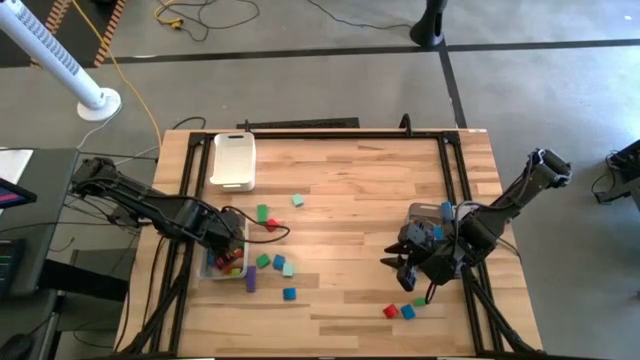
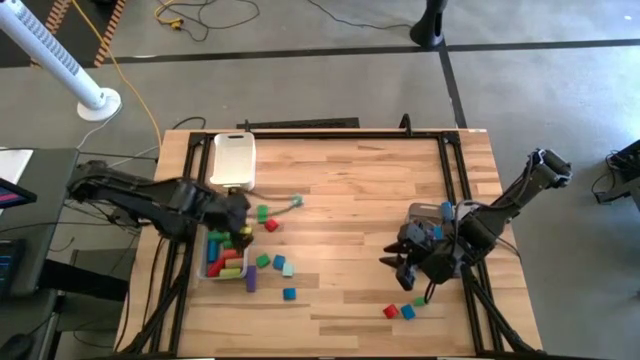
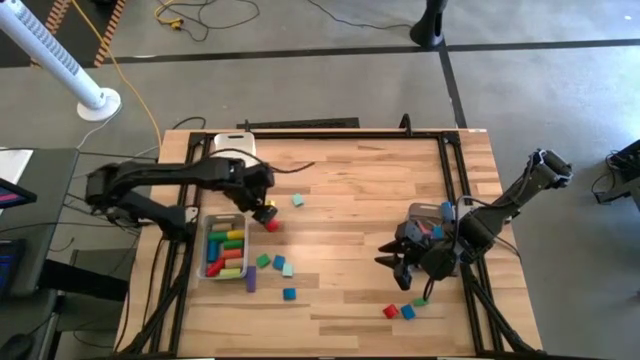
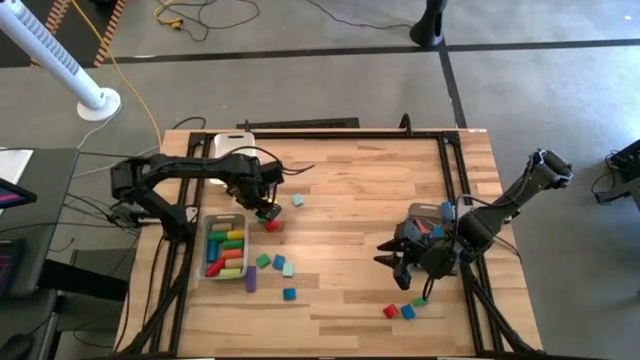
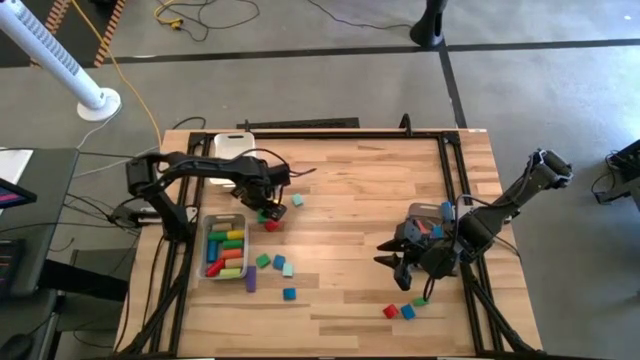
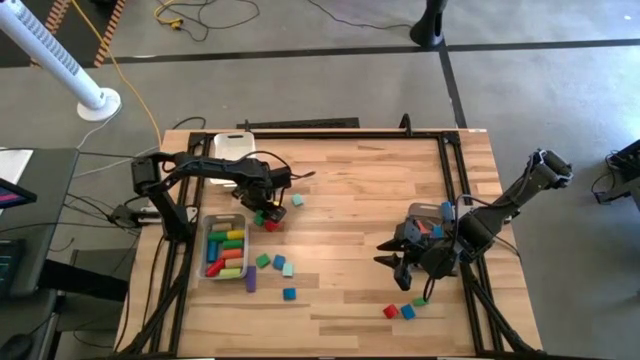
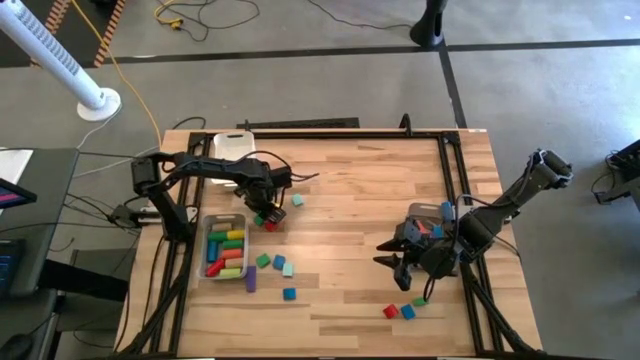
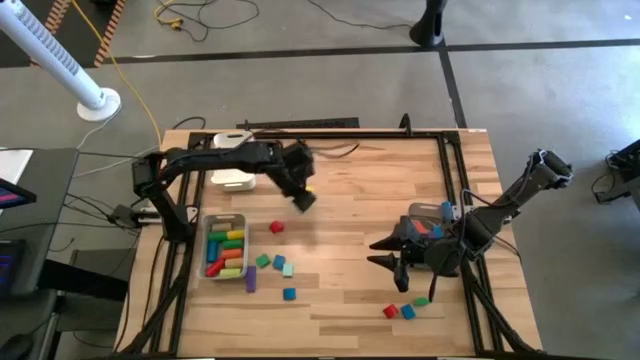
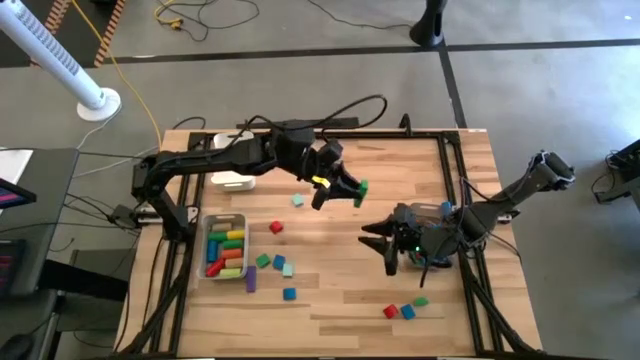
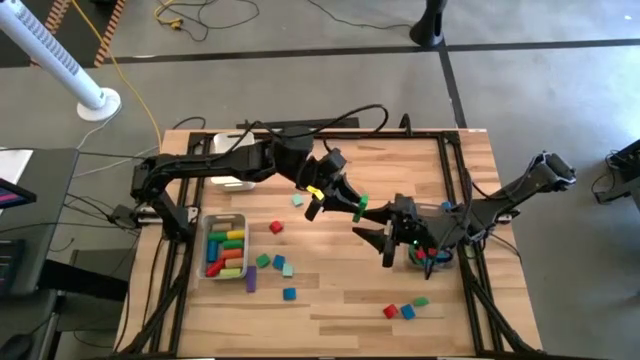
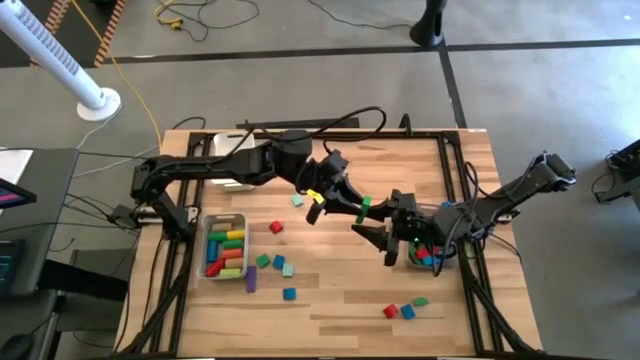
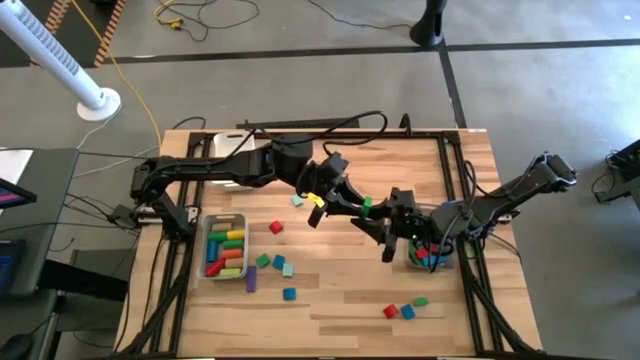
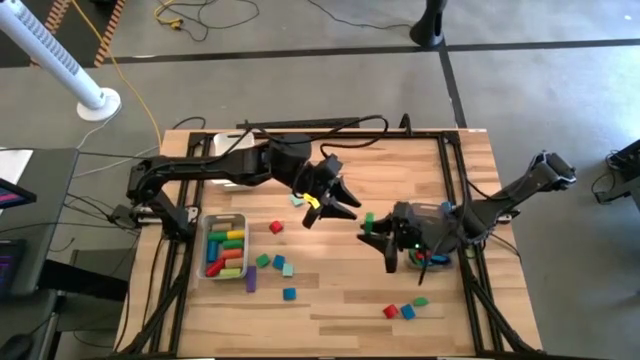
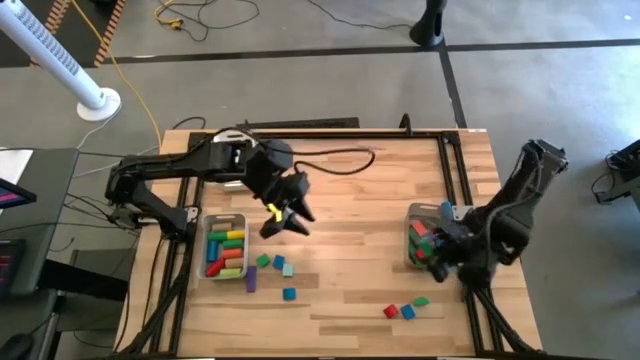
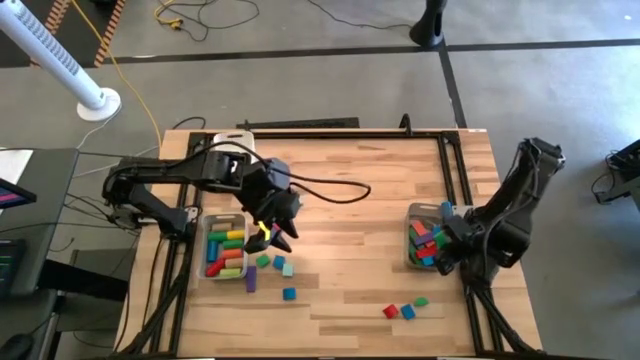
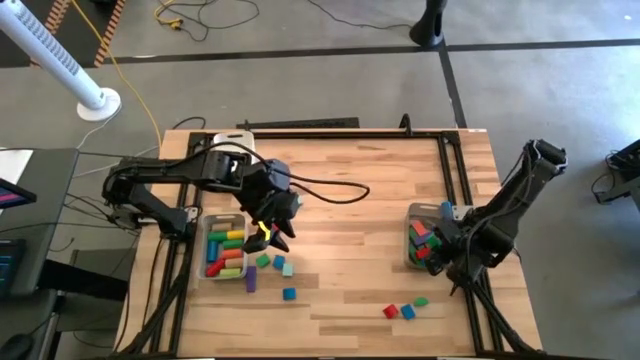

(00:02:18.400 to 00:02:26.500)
Task: Sort blocks by size
Put the dark green rectangular block into the black bin

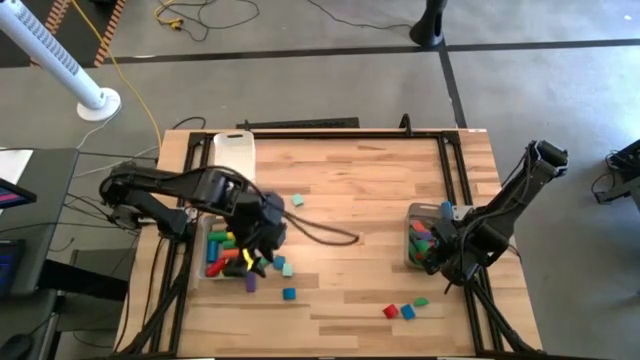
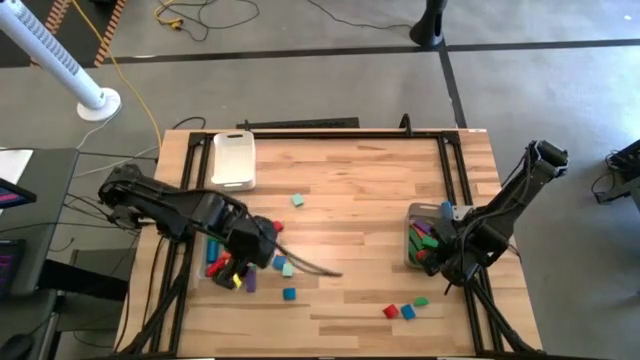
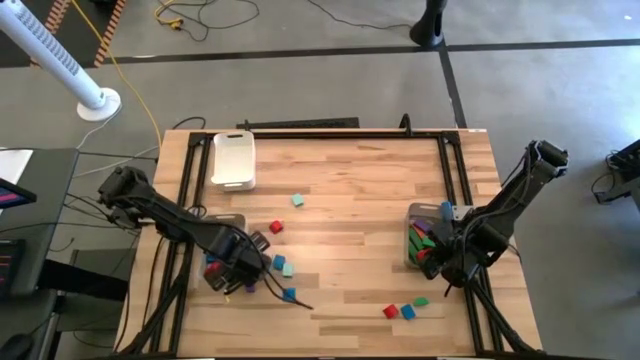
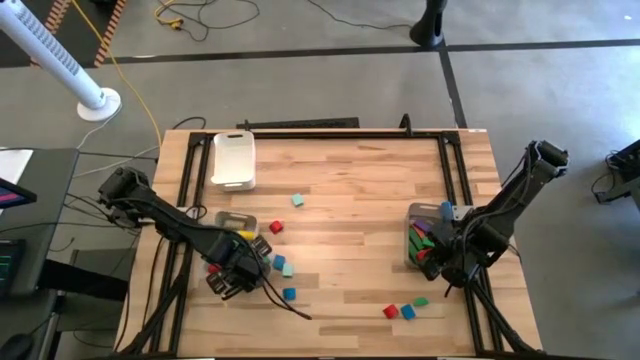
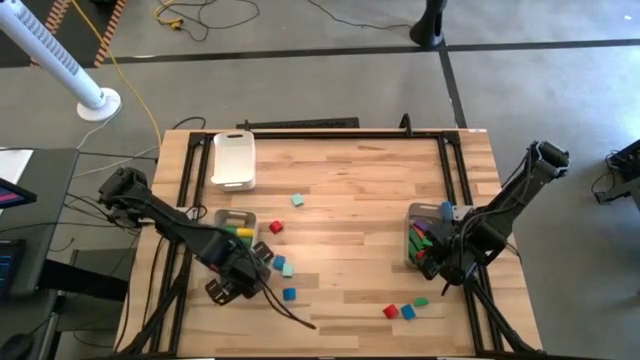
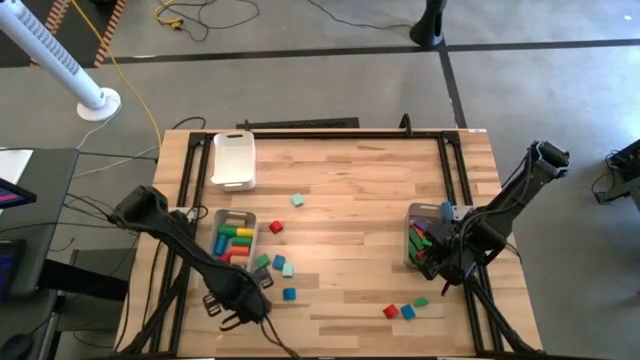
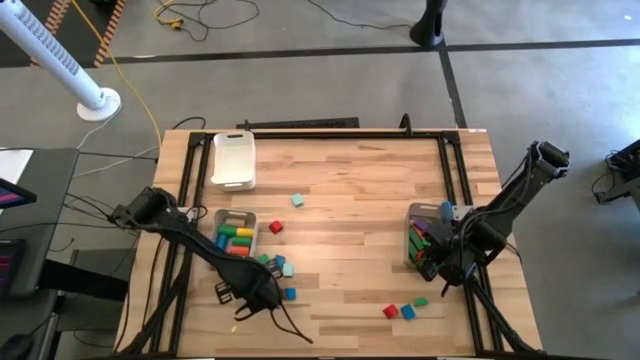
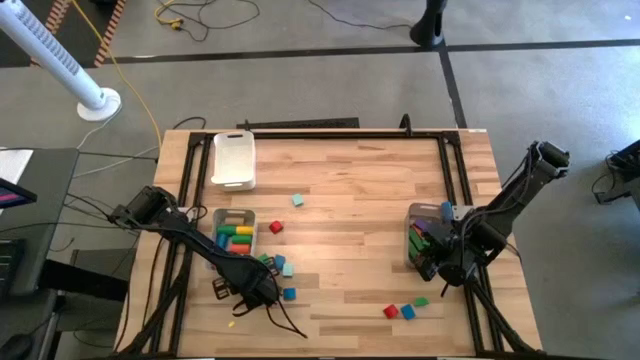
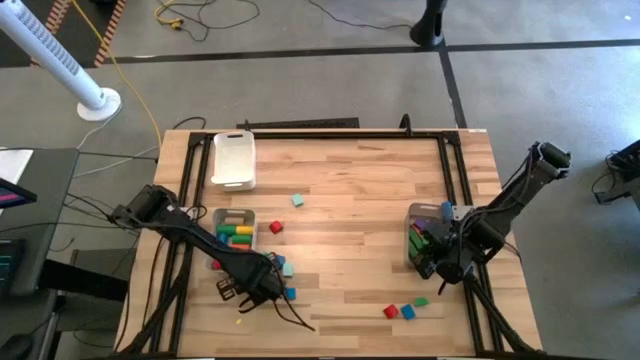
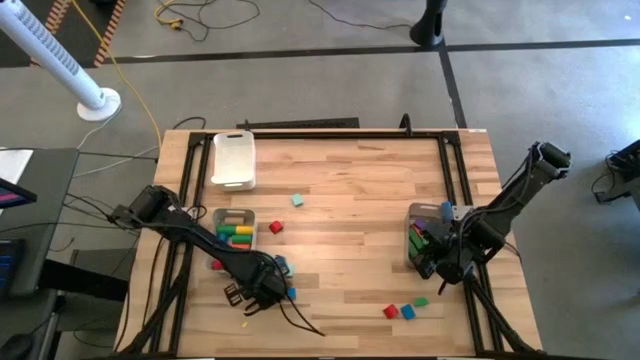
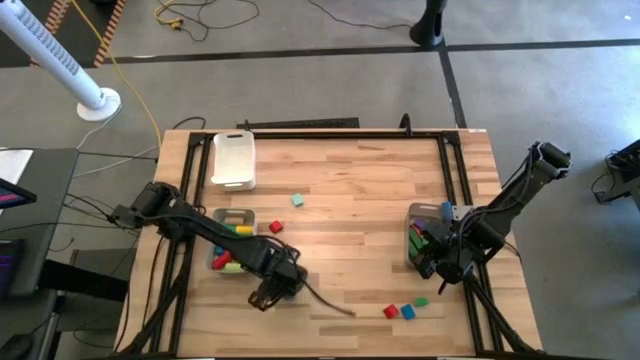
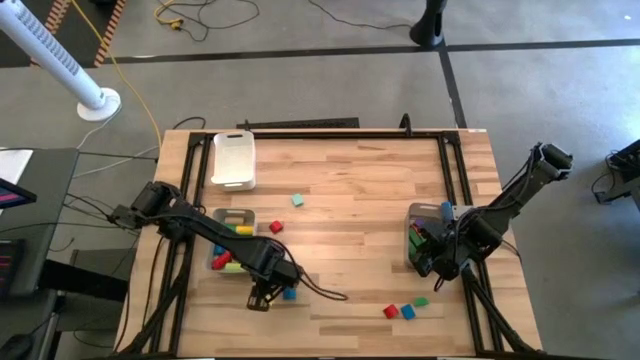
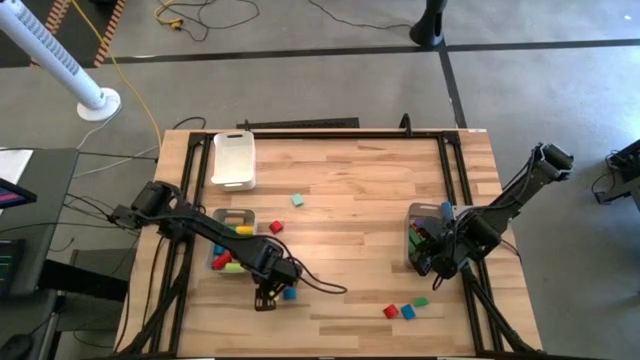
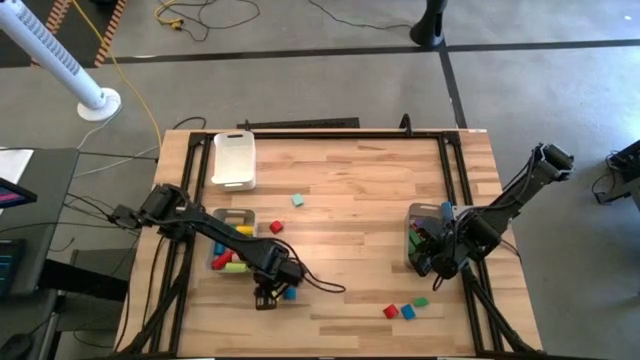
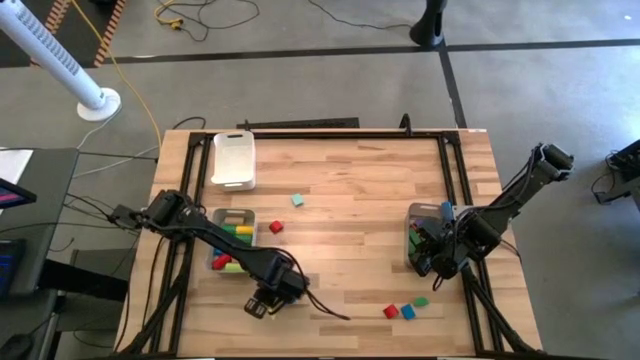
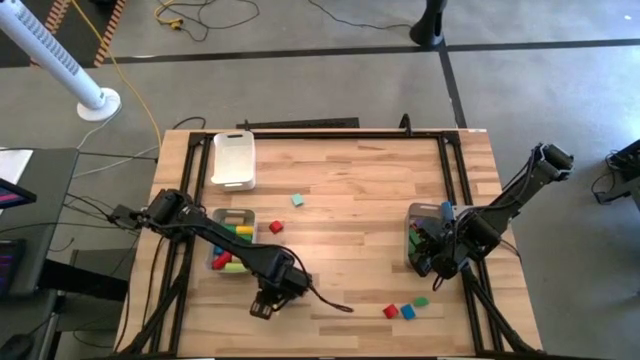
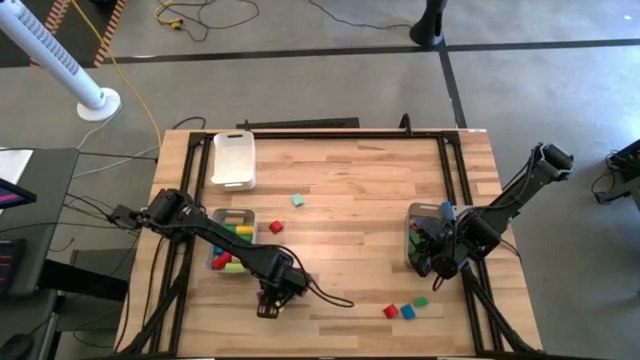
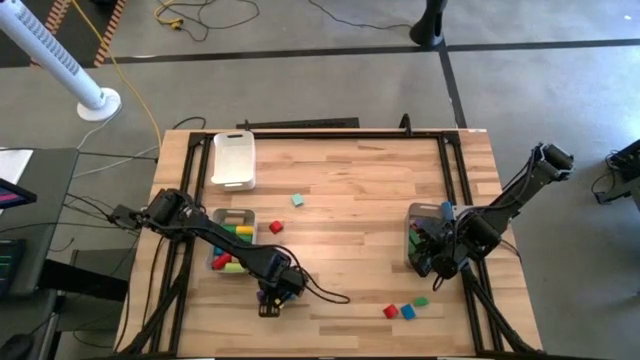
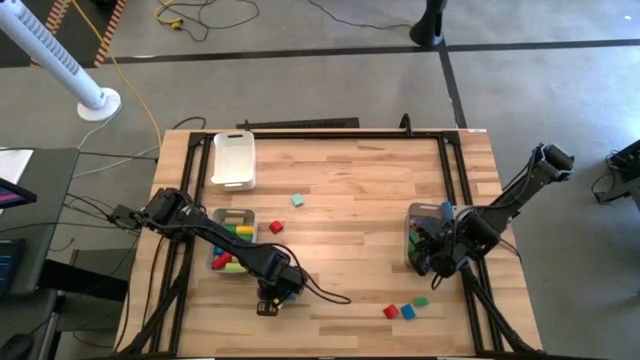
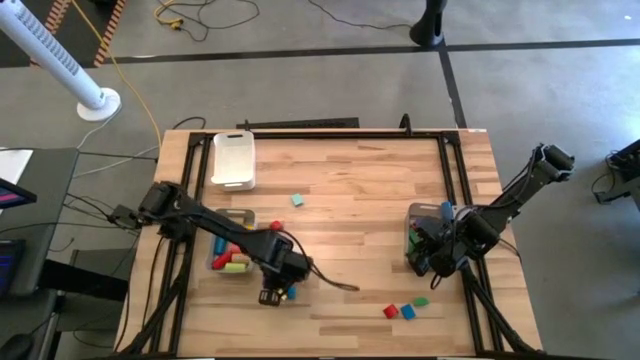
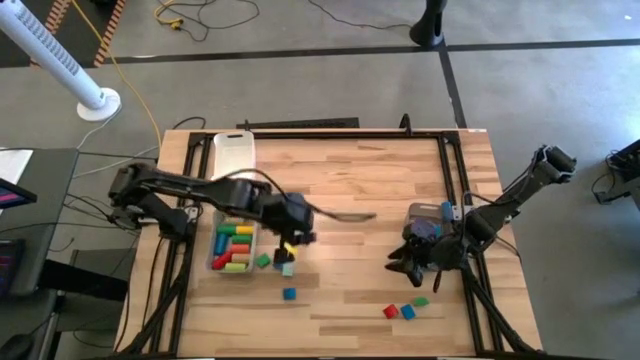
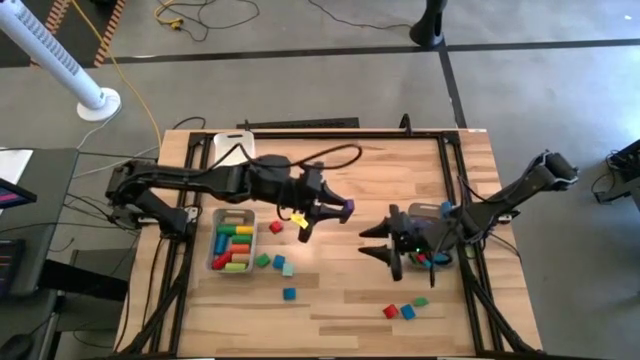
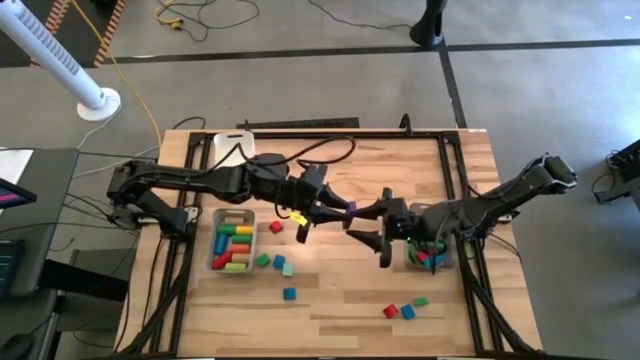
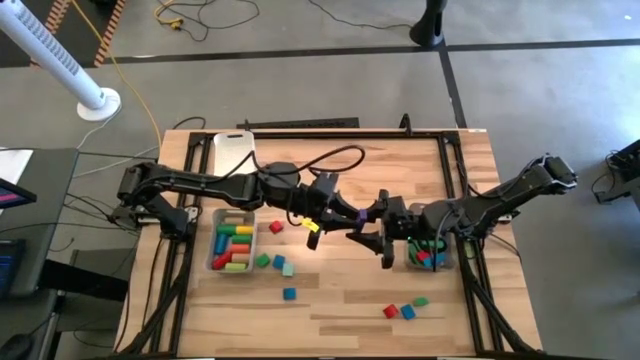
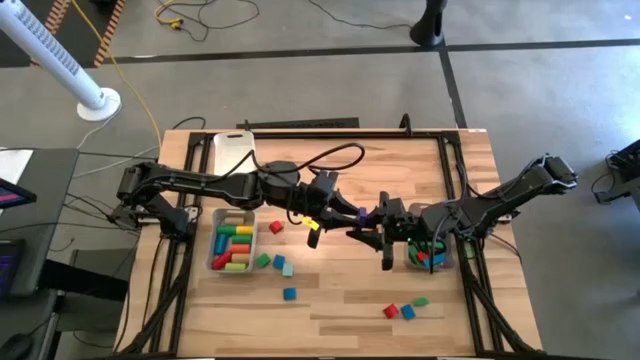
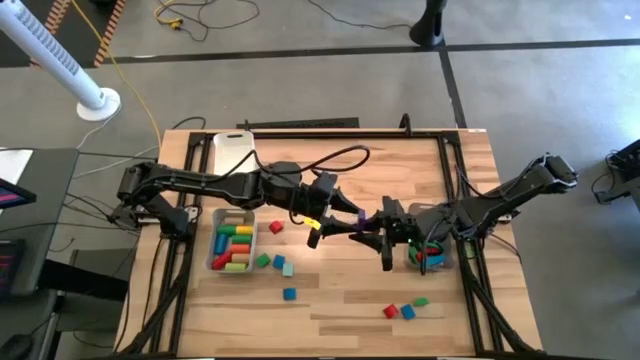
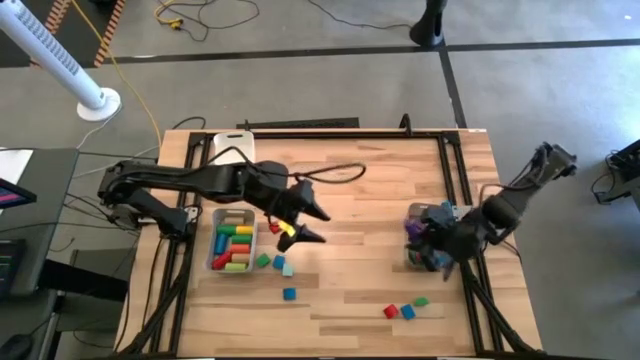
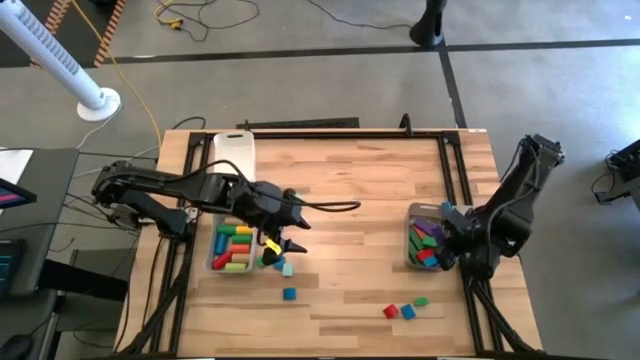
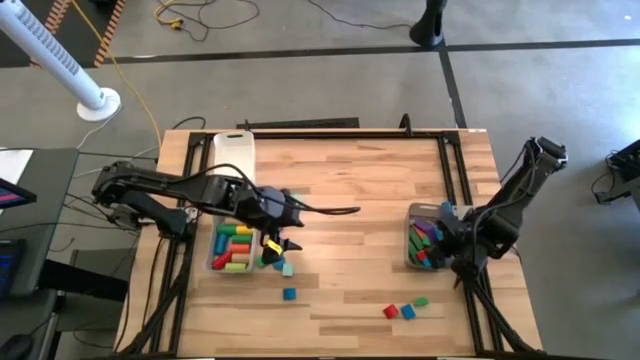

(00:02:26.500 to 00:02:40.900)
Put the purple rectangular block into the black bin
